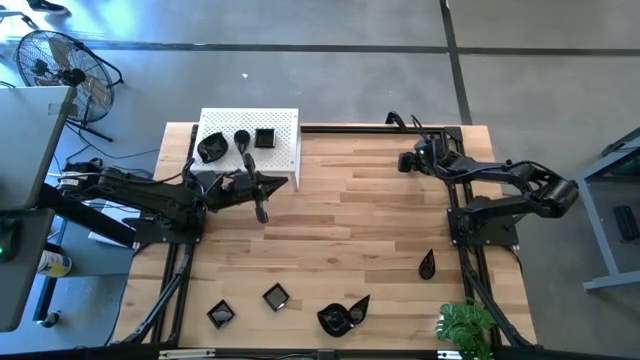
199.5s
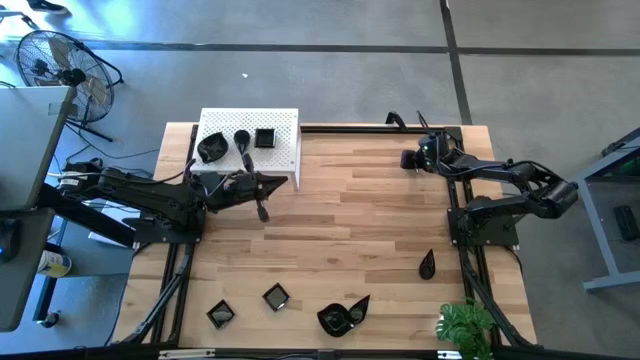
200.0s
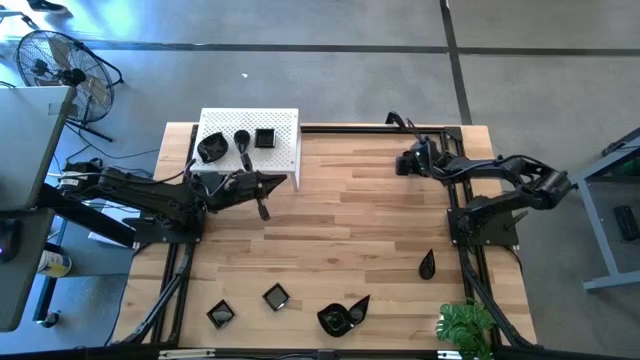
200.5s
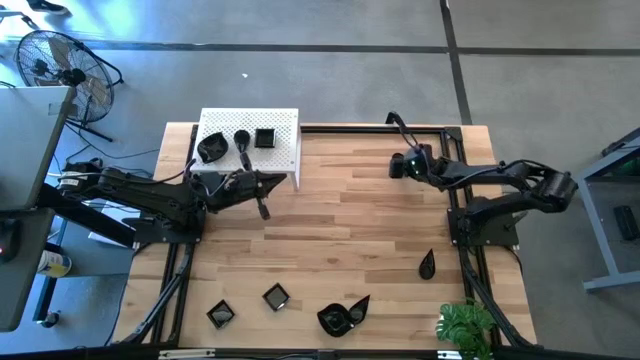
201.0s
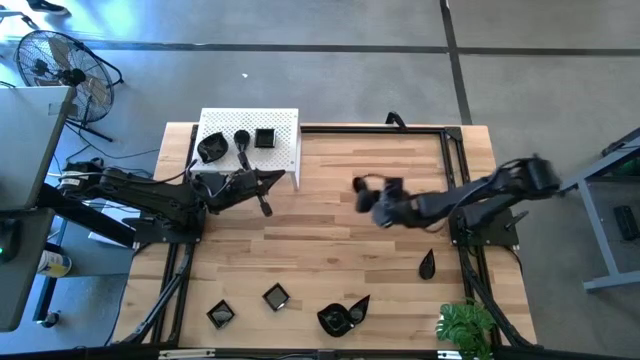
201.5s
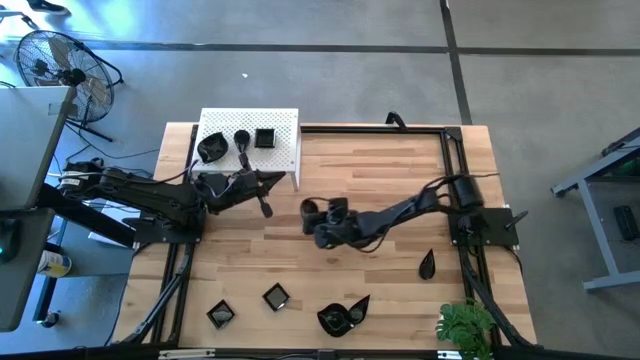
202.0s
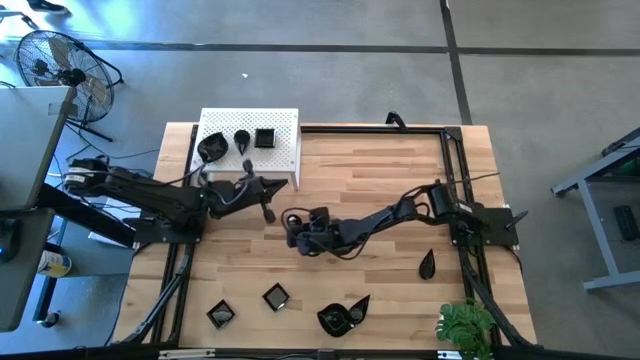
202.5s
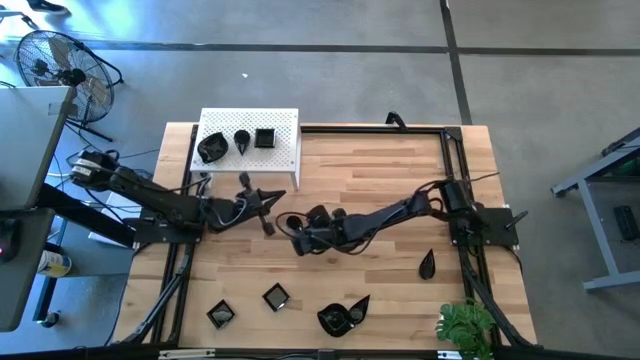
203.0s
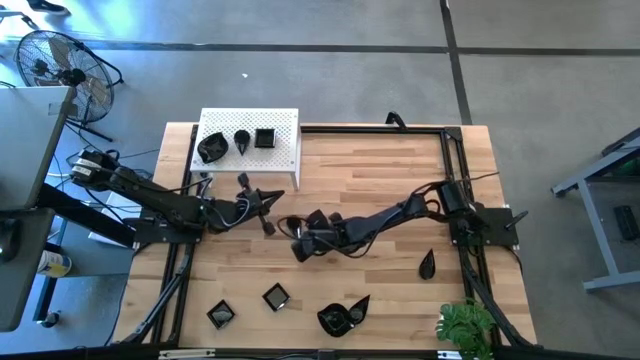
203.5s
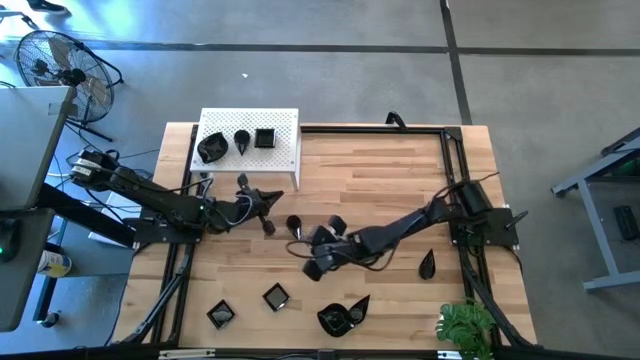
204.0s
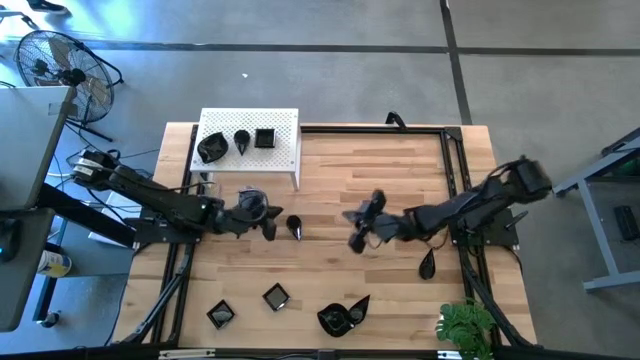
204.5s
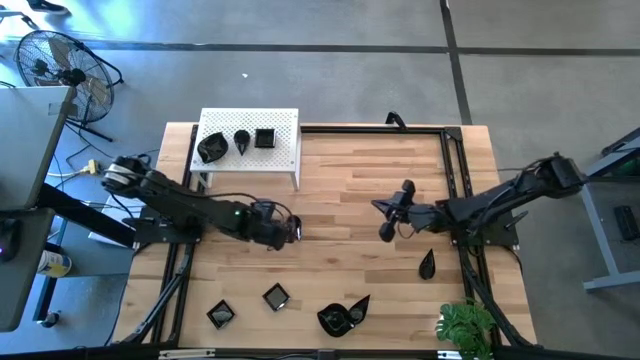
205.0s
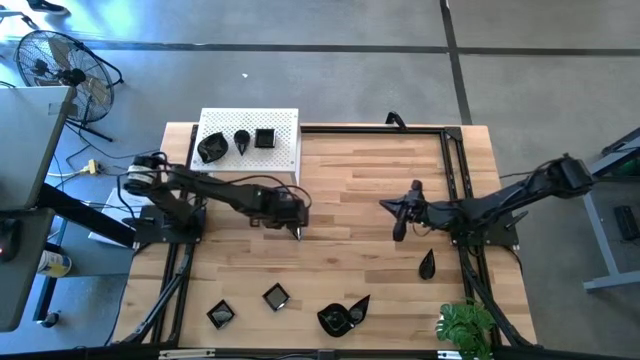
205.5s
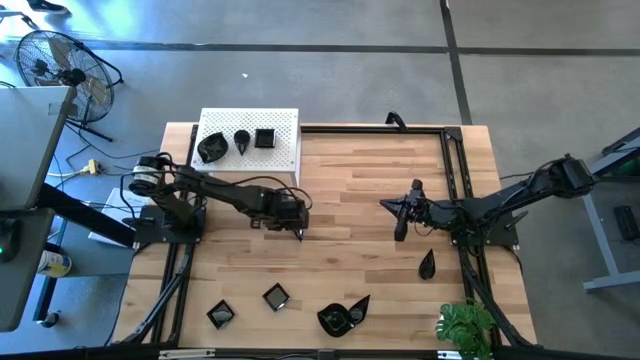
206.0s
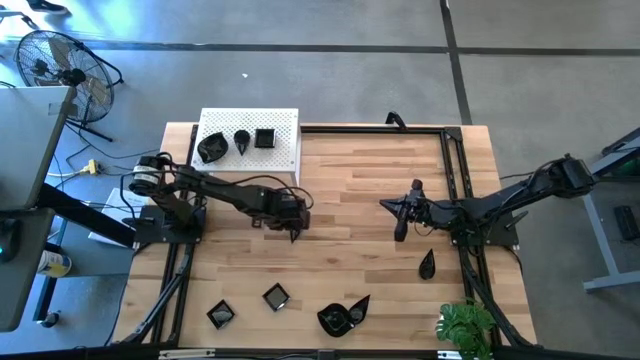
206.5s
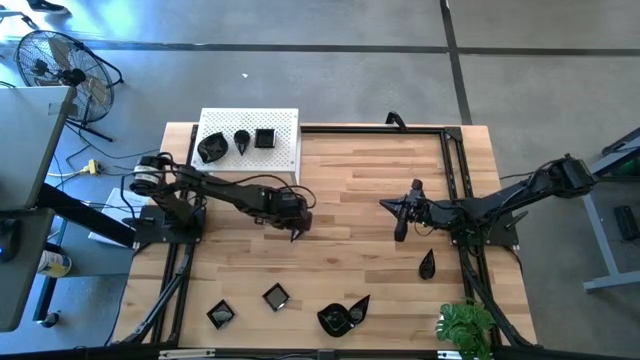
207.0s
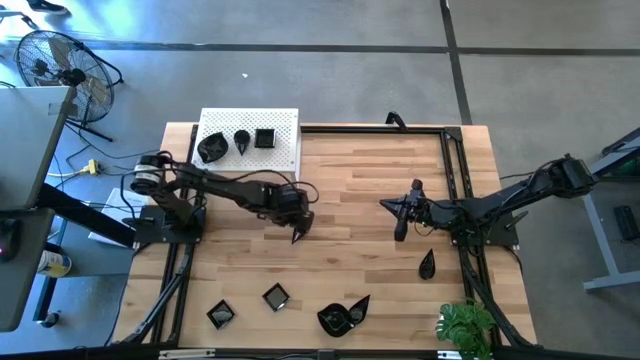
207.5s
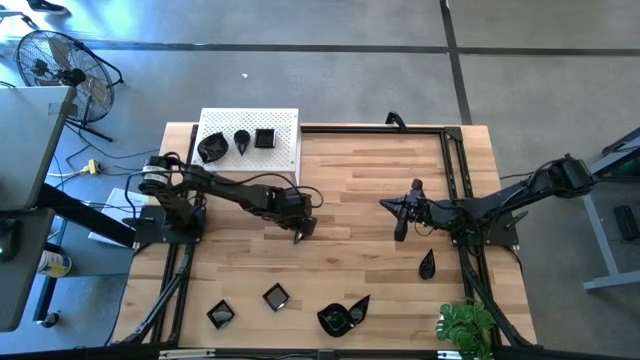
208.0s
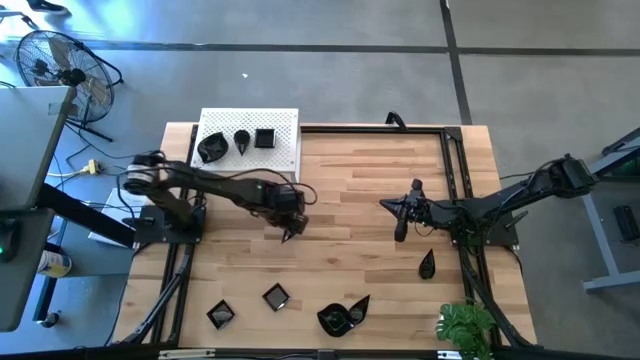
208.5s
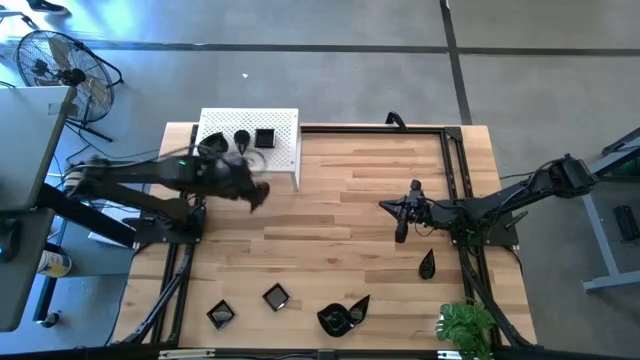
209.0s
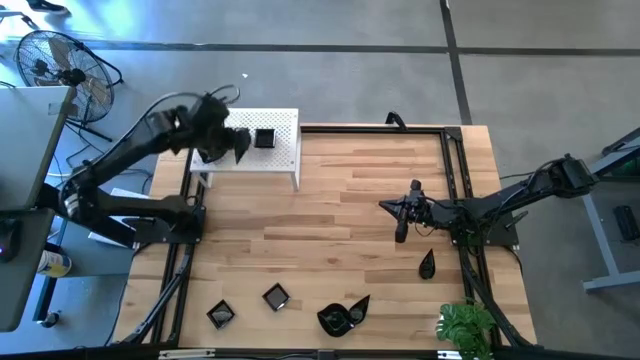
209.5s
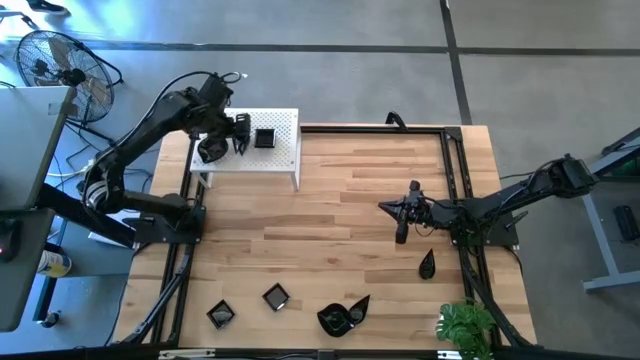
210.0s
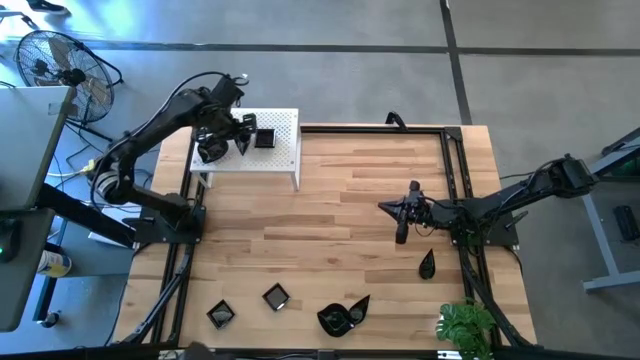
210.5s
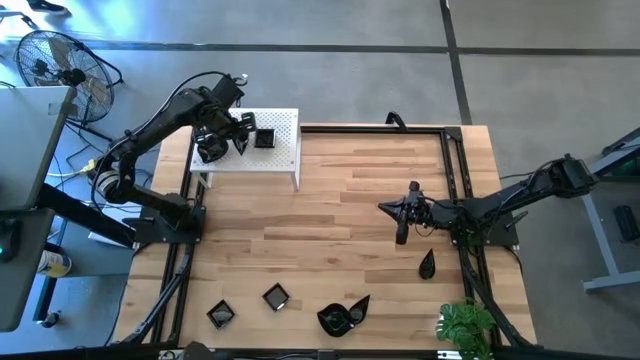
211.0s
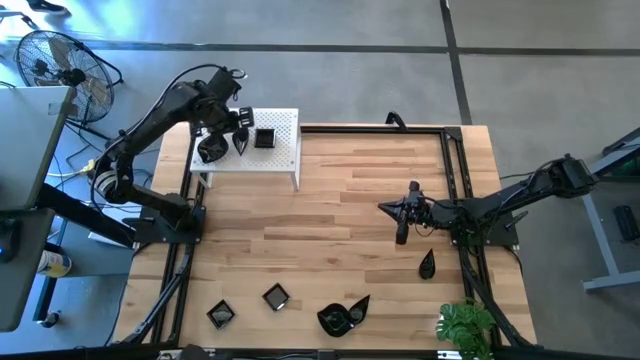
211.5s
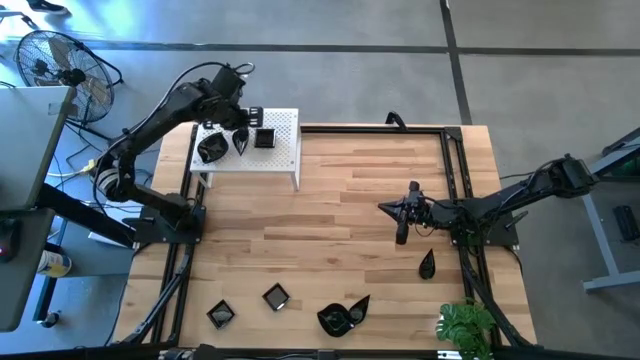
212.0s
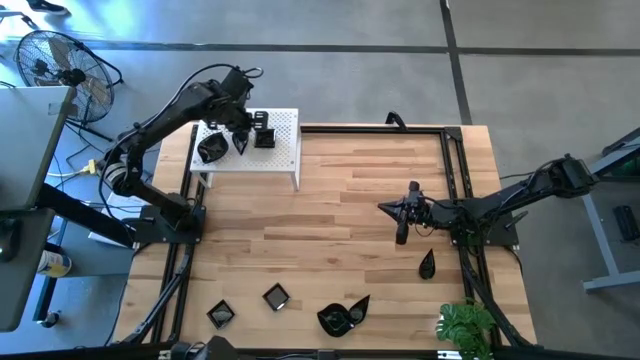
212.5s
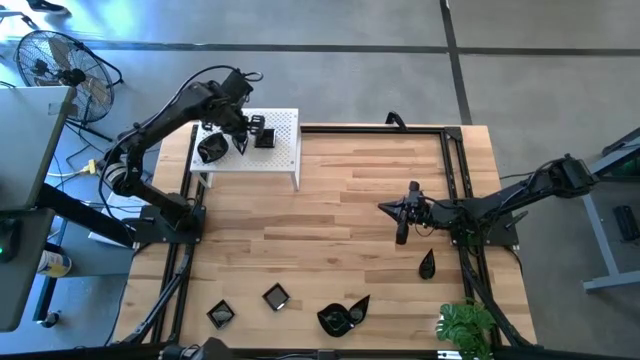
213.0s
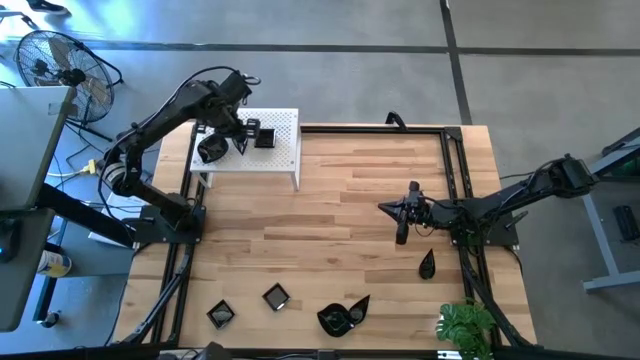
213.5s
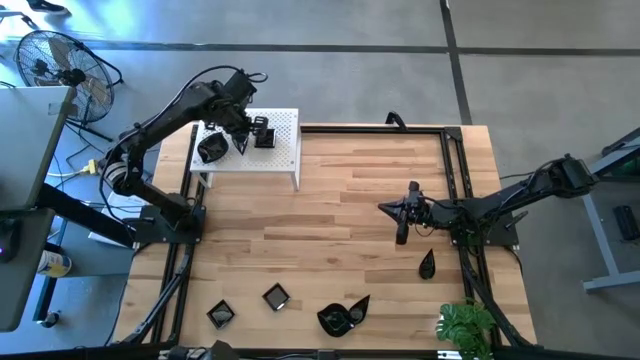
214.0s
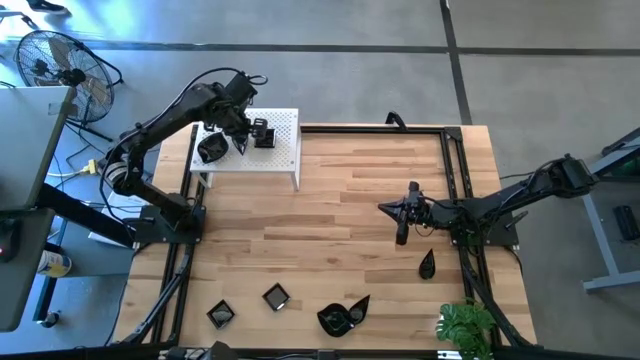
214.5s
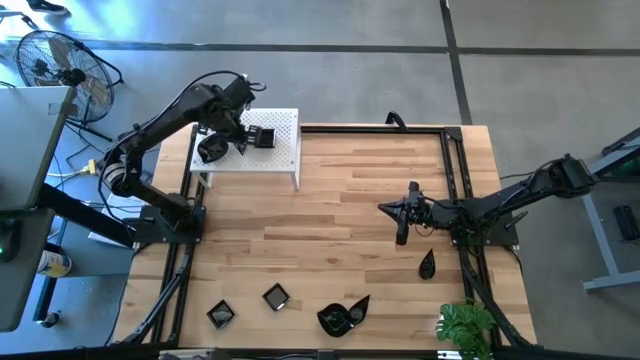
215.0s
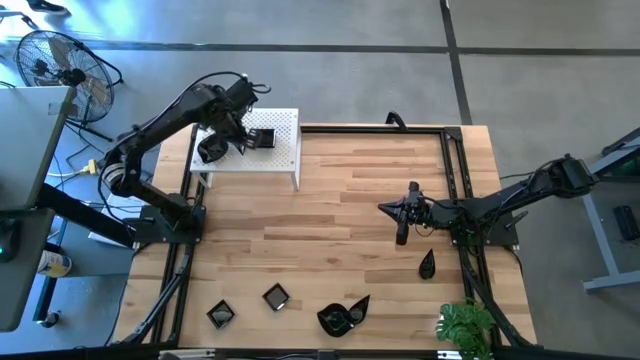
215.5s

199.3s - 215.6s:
Task: Pick & Place Mini shaped plates
Stack the top black drop shaped plate on top of the stacked black drop shaped plates on the shelf

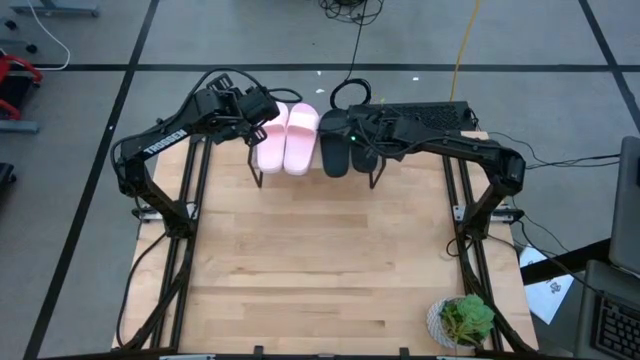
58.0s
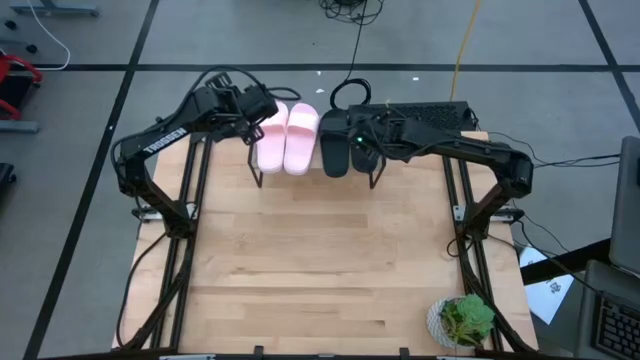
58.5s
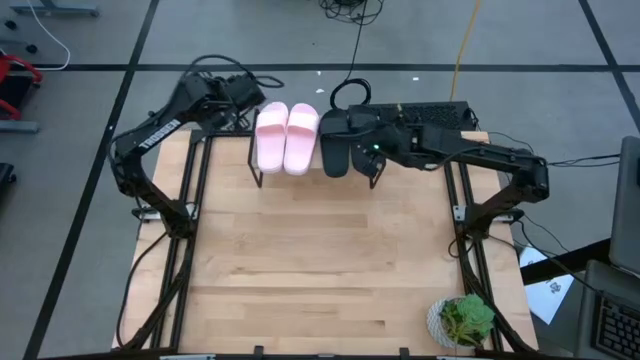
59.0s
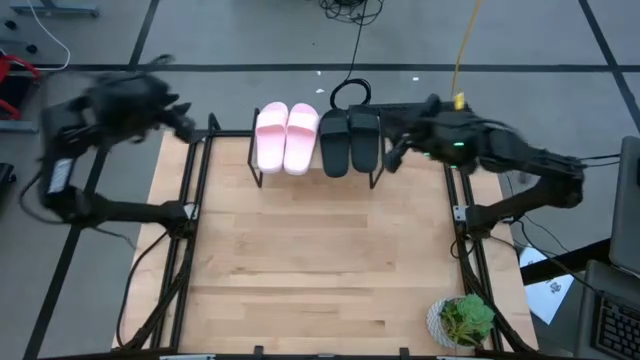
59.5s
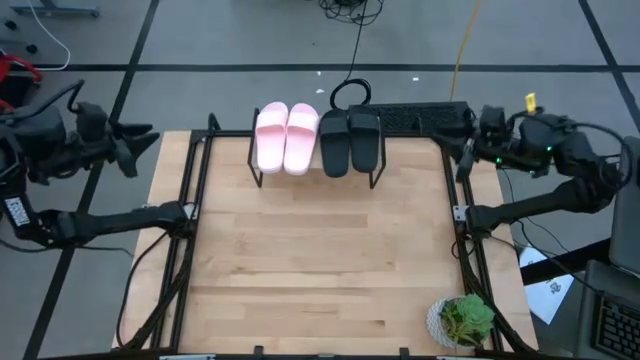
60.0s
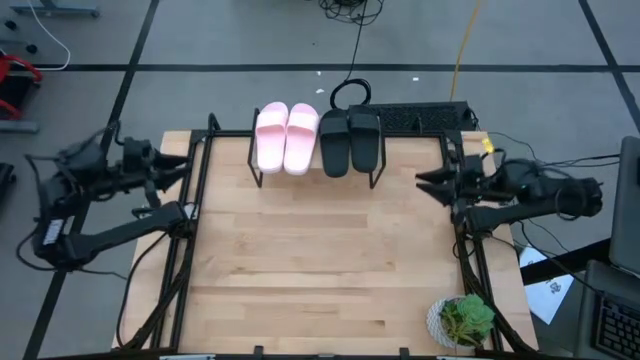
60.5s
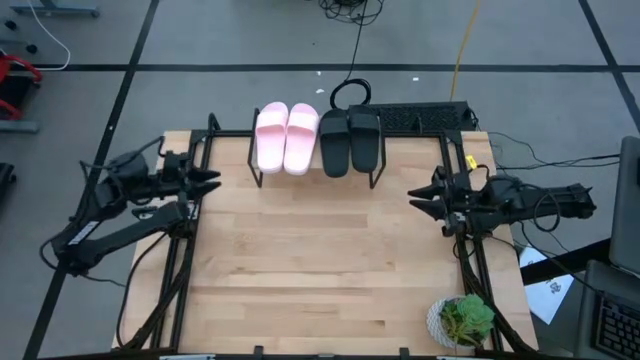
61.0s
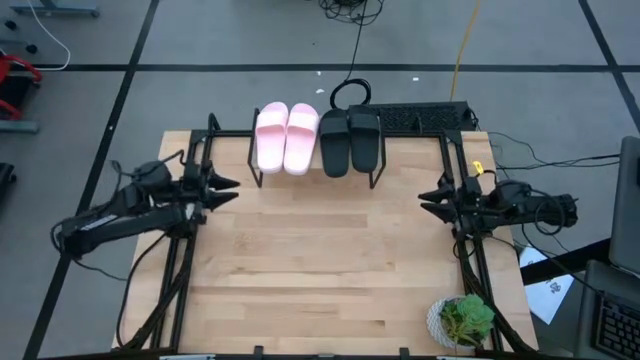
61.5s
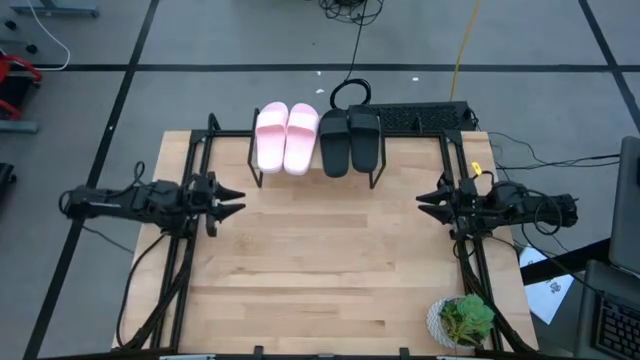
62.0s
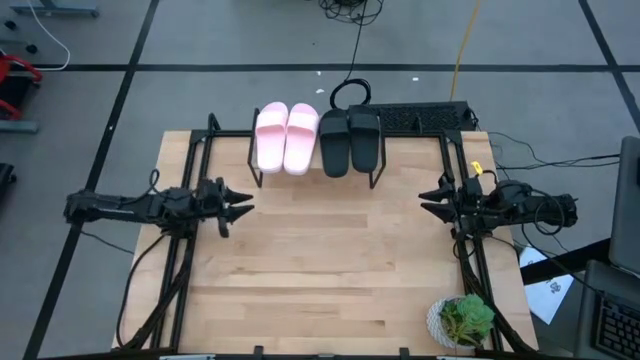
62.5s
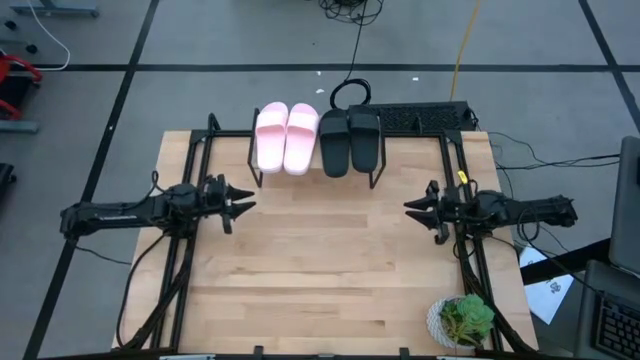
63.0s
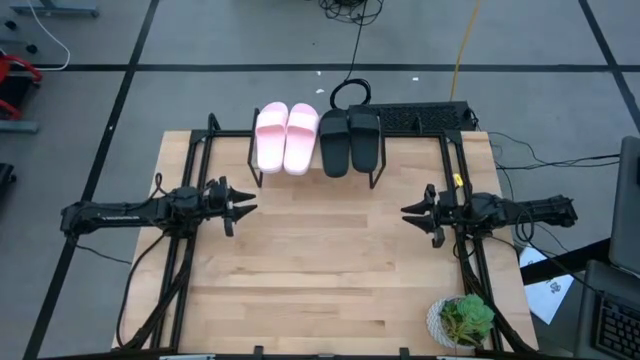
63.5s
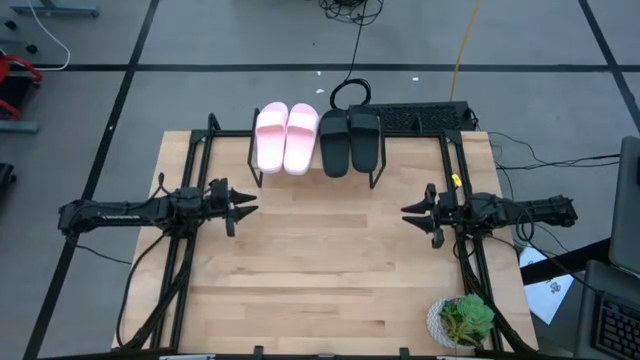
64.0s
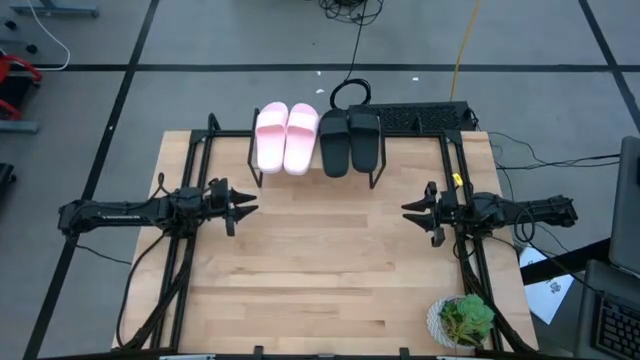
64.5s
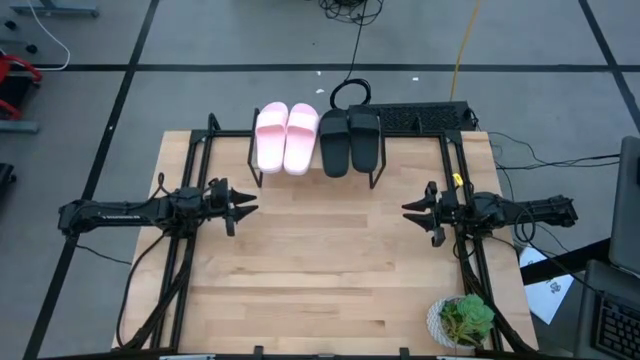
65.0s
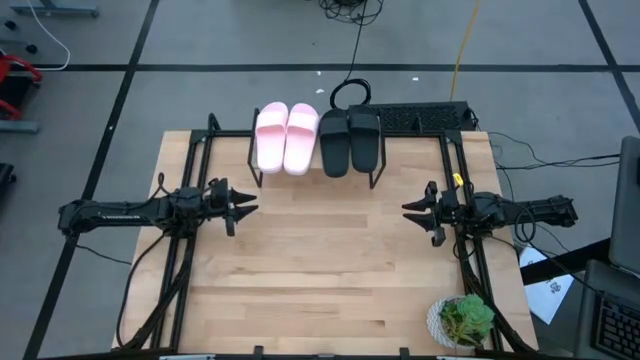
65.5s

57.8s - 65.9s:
Task: Pick and place slides into the shelf
Return to Home Position
